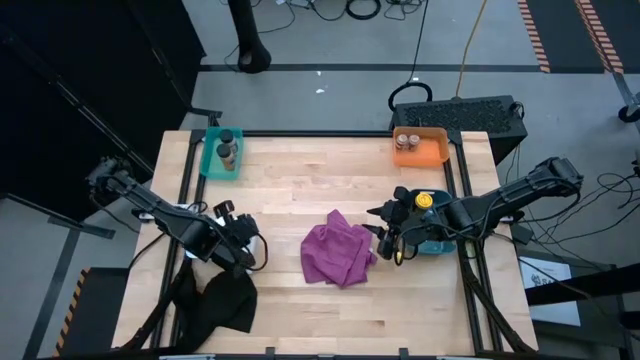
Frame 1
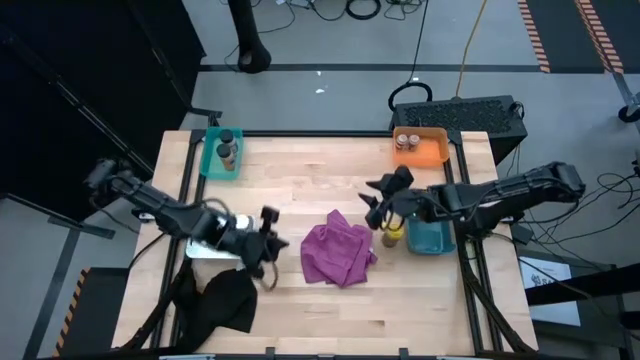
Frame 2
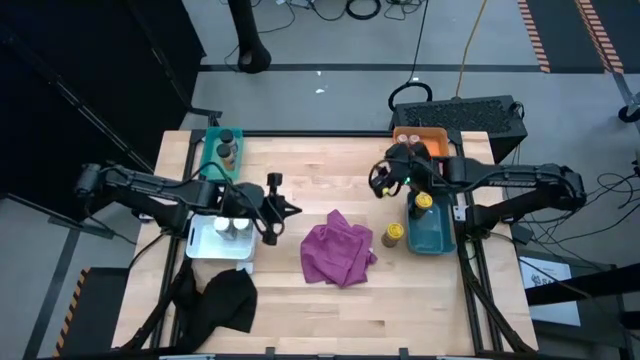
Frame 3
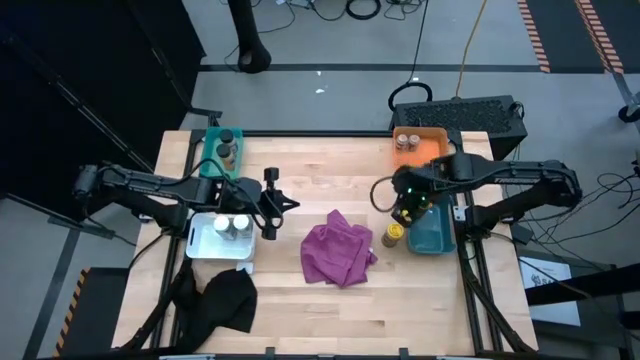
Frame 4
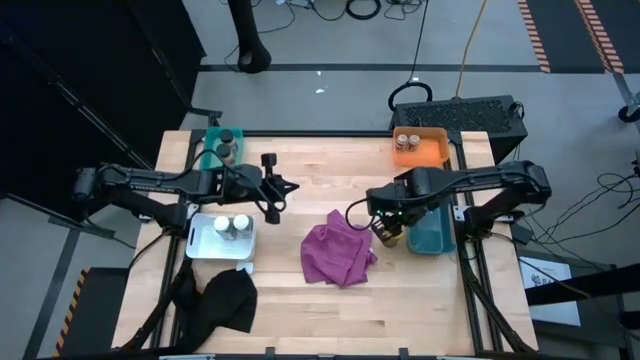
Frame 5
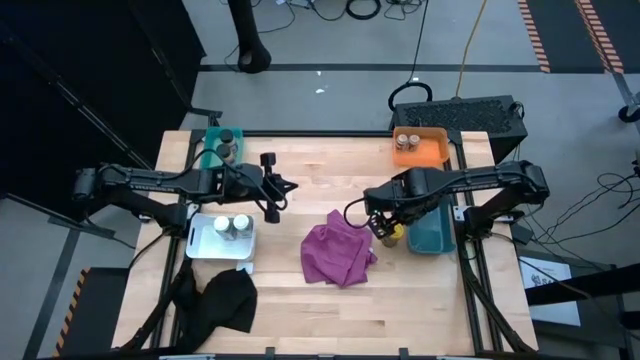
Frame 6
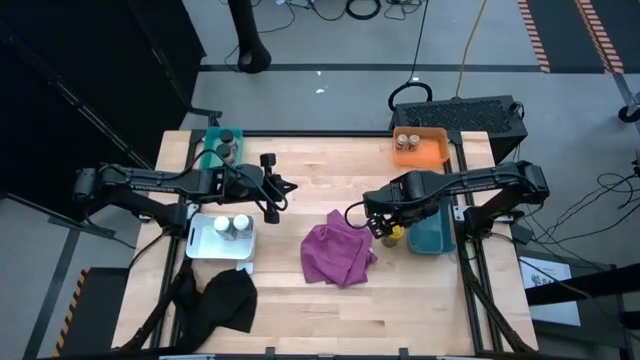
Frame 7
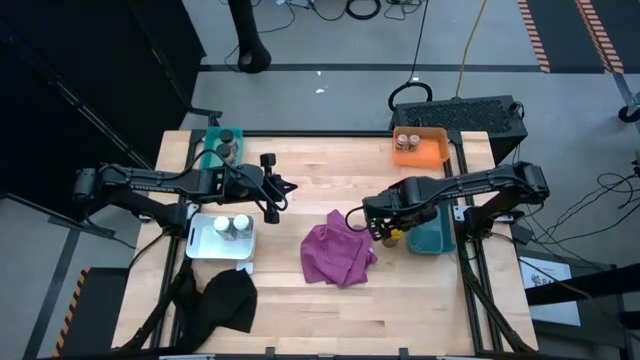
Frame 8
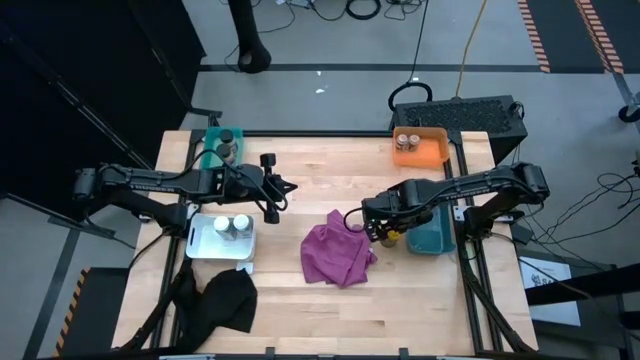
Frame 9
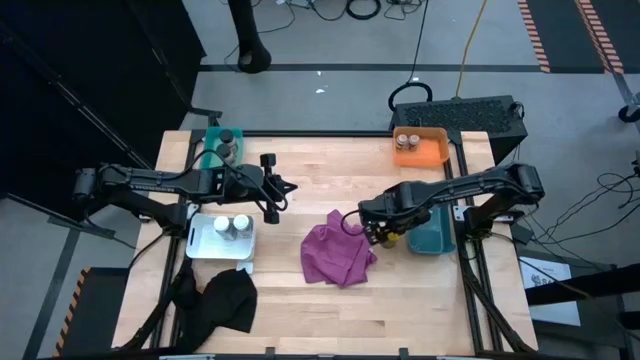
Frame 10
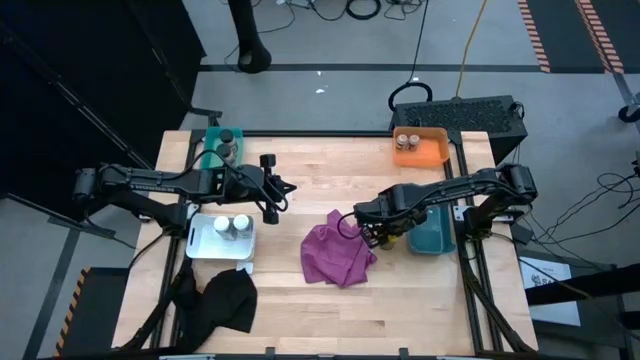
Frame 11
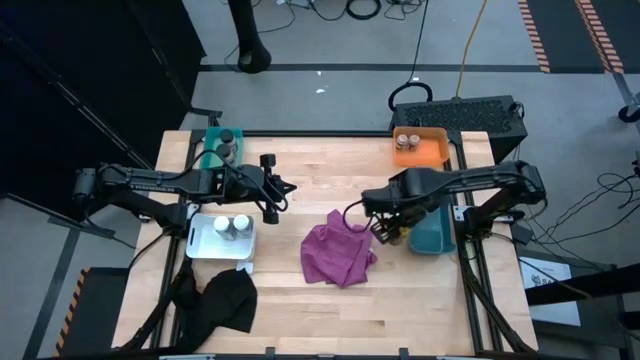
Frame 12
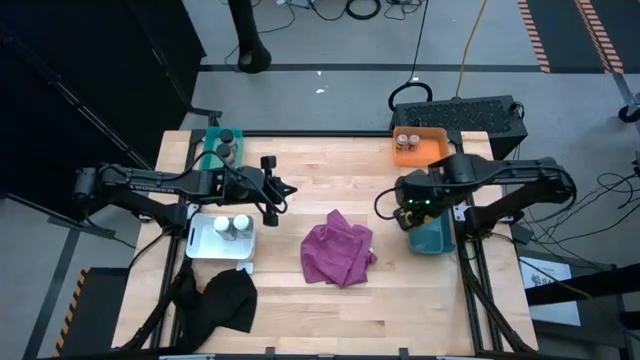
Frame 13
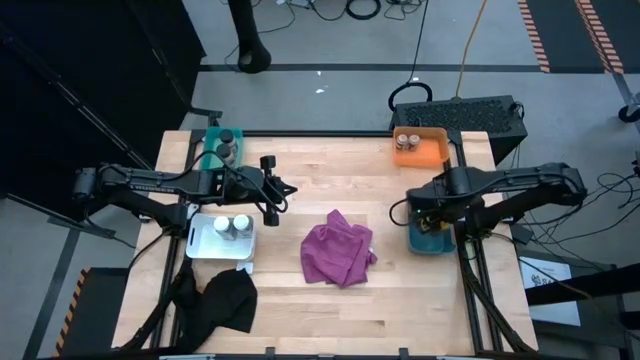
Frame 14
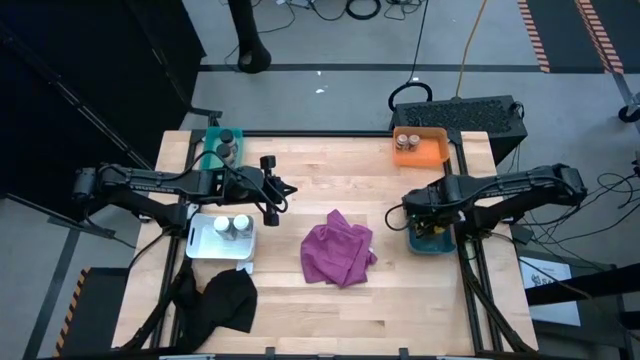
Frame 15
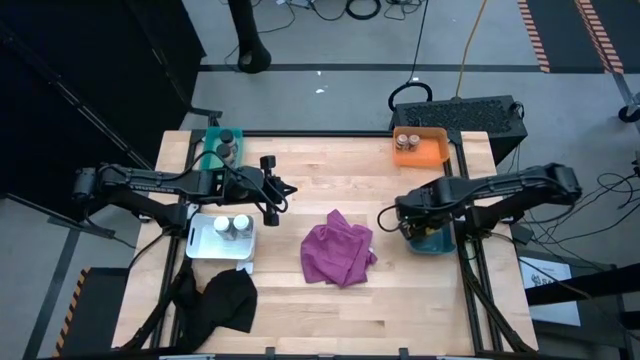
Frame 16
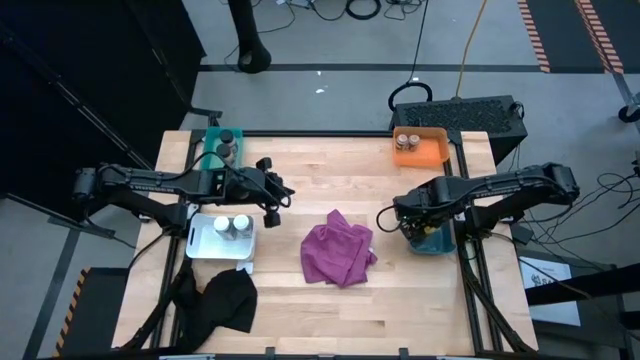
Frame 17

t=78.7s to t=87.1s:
Task: Sort spices by type
Put the yellow seasoning bottle into the blue bin

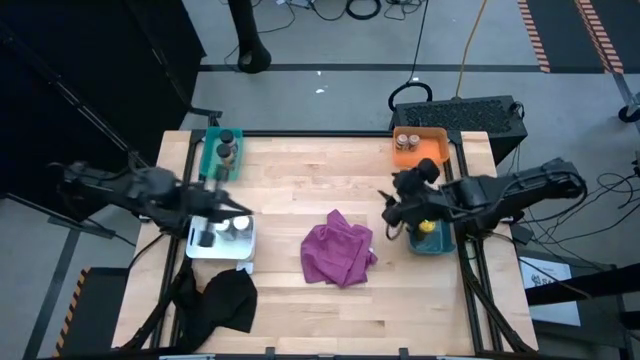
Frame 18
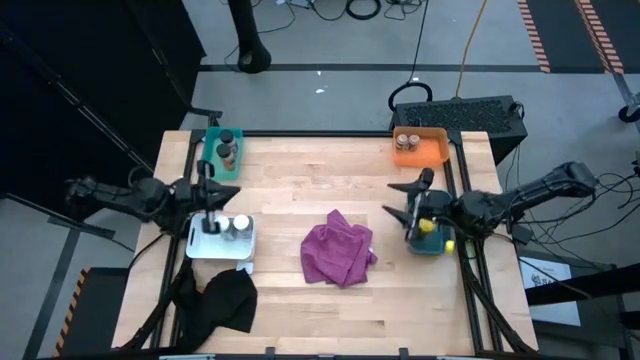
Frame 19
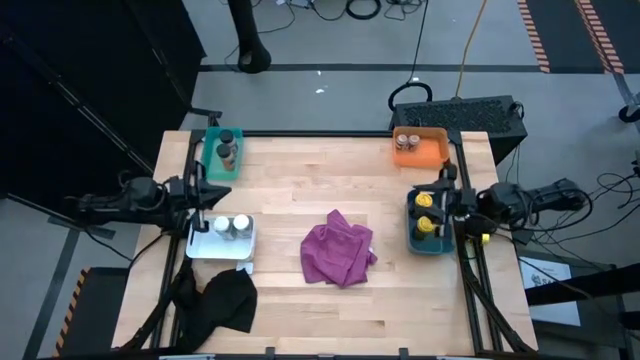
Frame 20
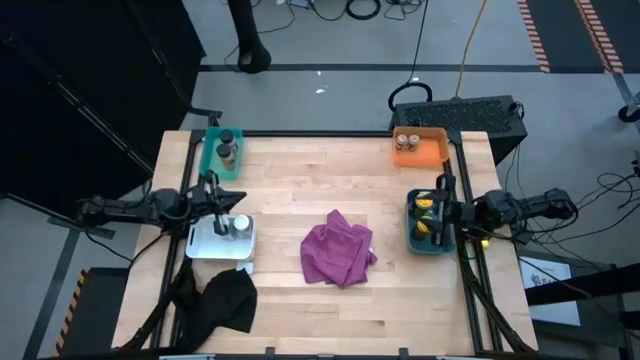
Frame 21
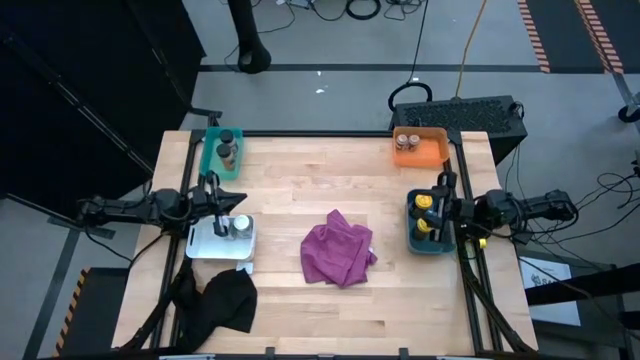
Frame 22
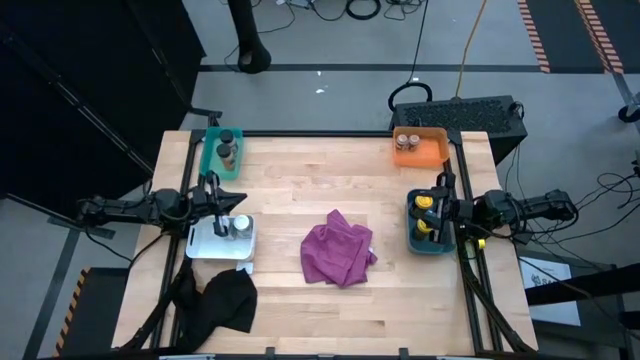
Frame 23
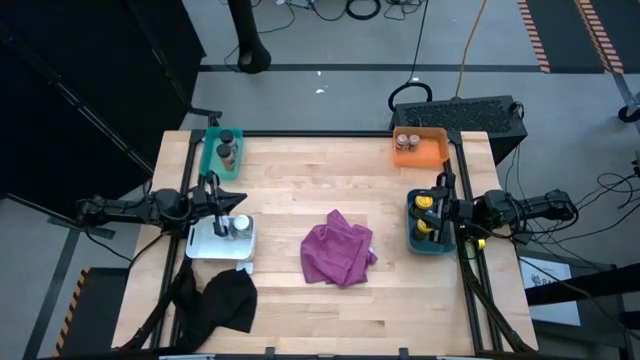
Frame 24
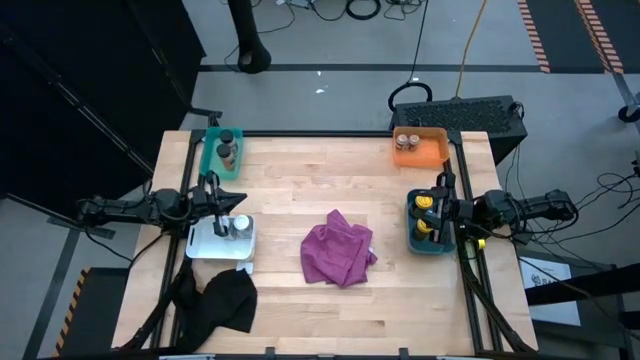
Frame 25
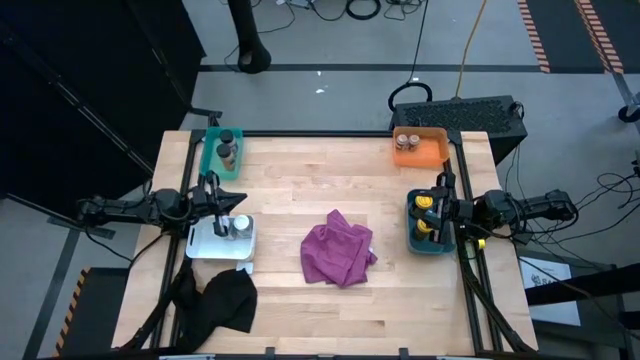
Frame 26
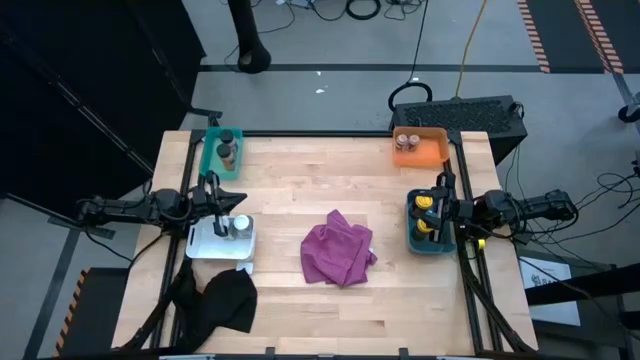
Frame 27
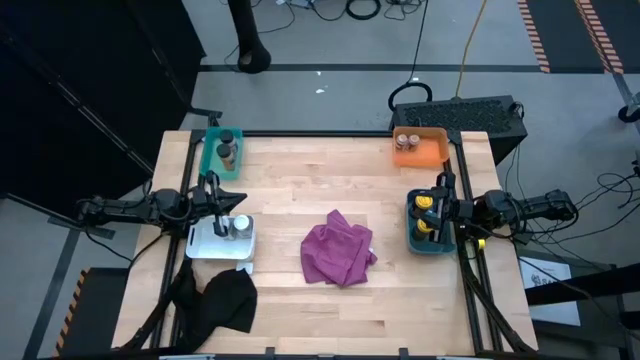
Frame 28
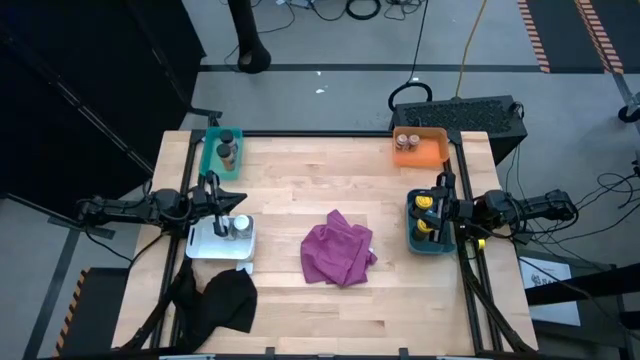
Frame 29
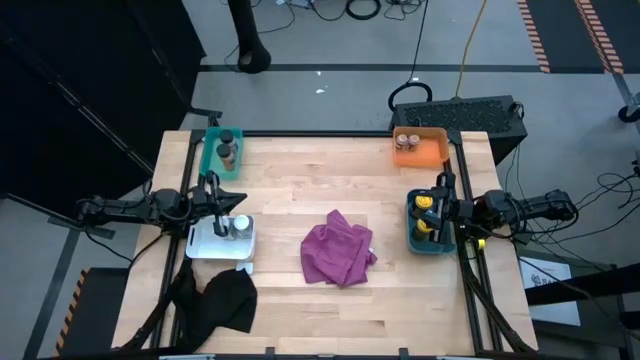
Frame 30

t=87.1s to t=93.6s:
Return to Home Position

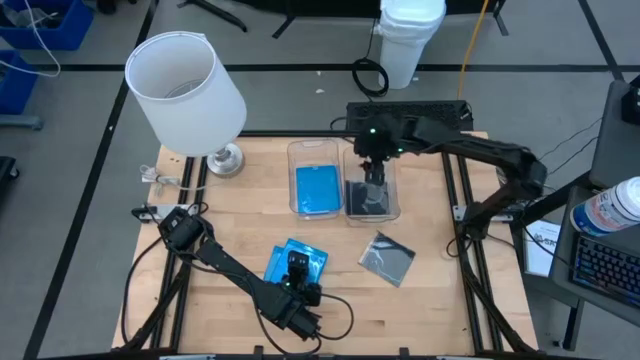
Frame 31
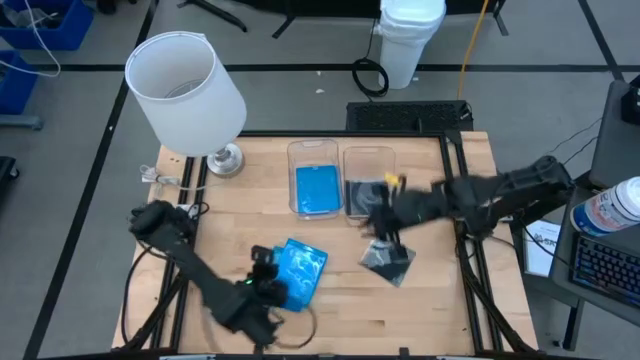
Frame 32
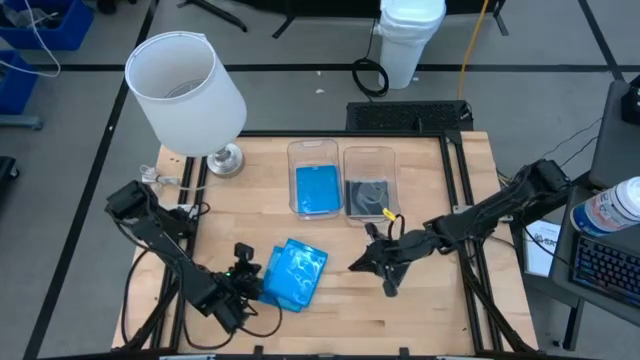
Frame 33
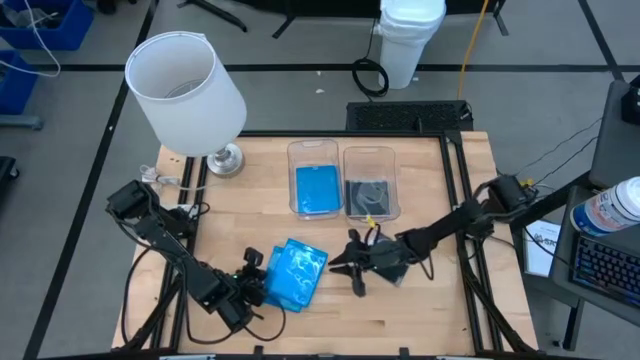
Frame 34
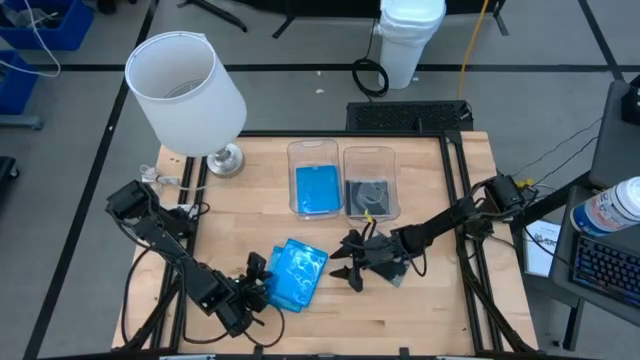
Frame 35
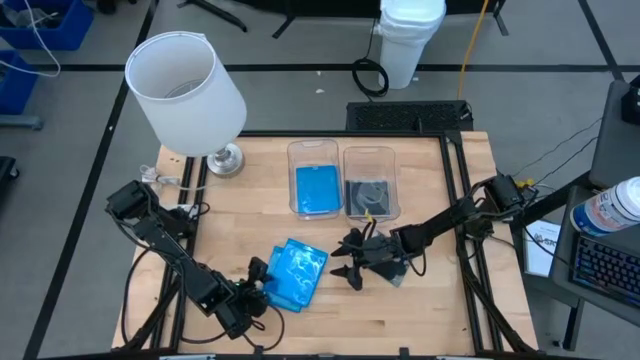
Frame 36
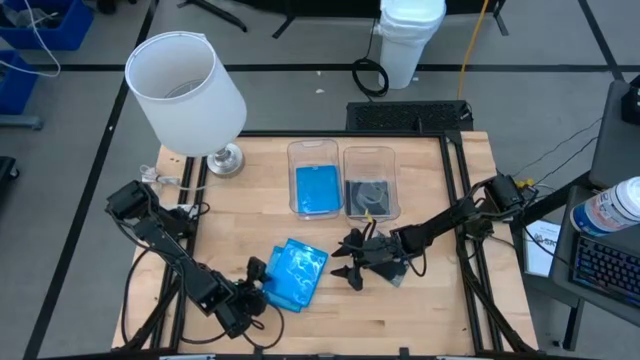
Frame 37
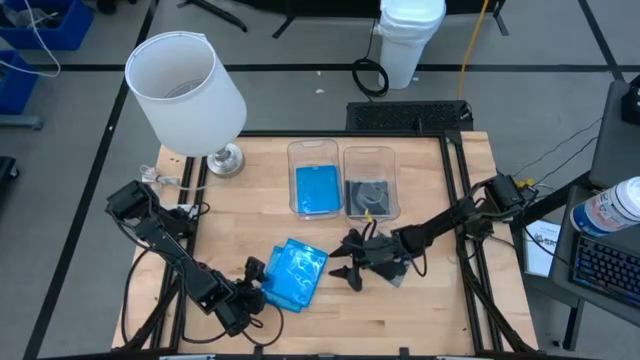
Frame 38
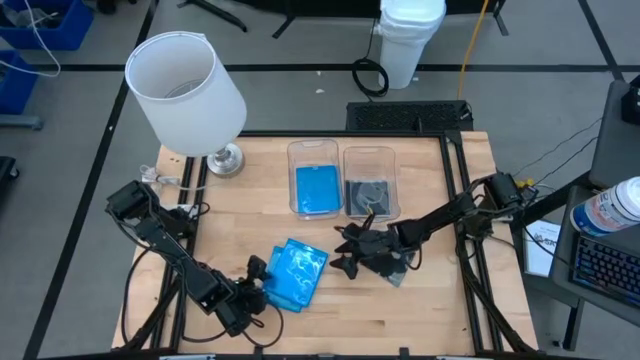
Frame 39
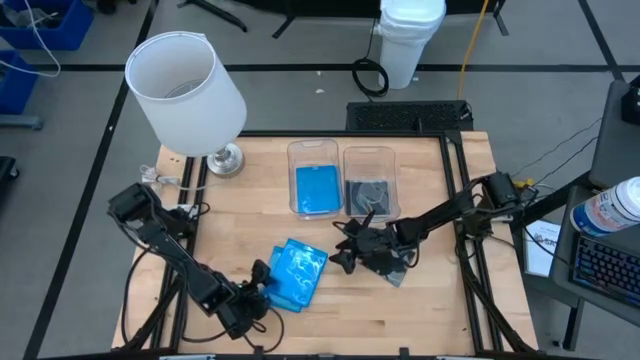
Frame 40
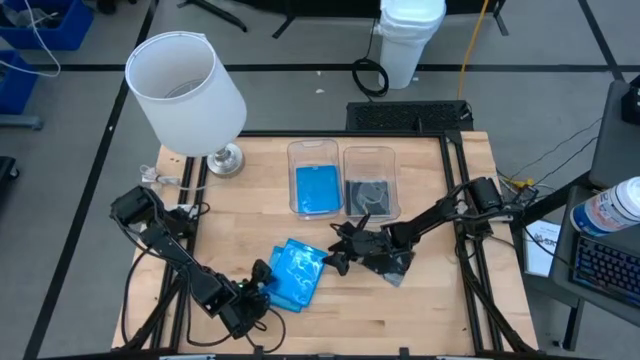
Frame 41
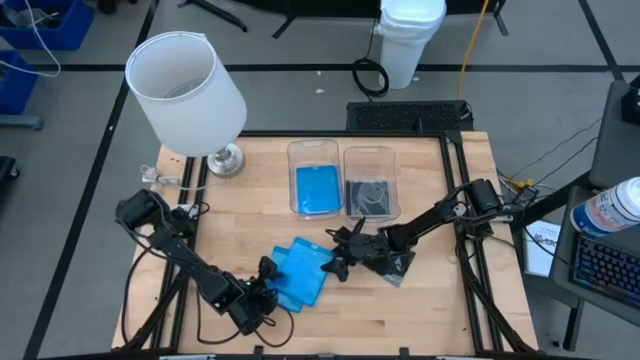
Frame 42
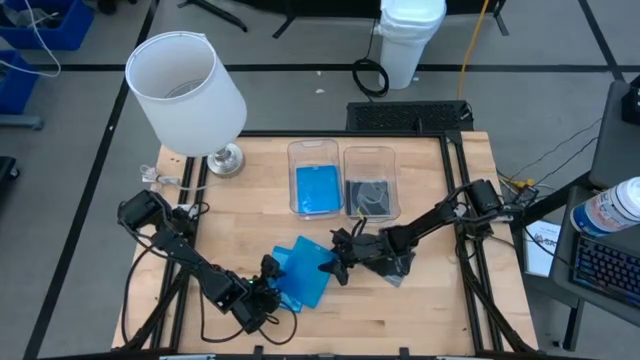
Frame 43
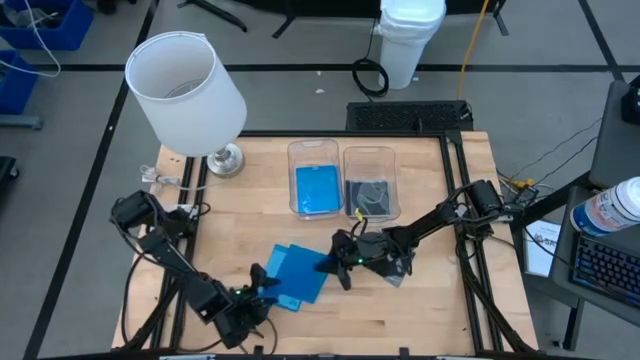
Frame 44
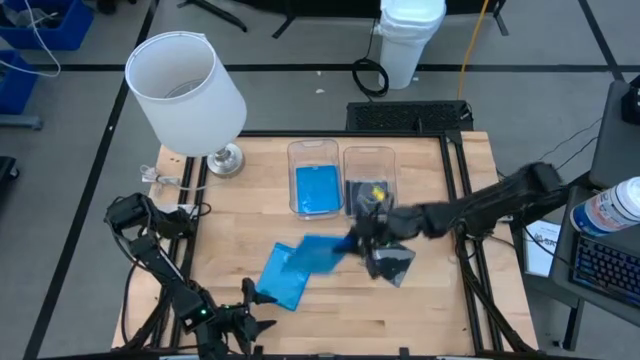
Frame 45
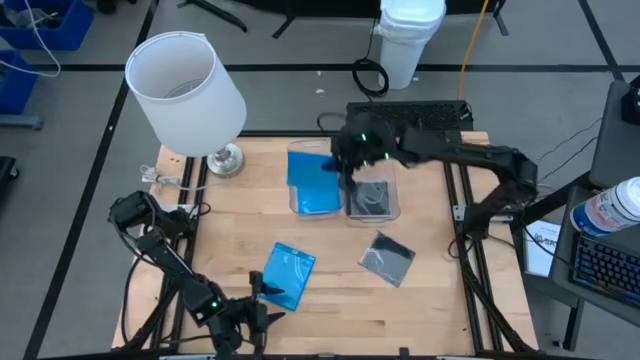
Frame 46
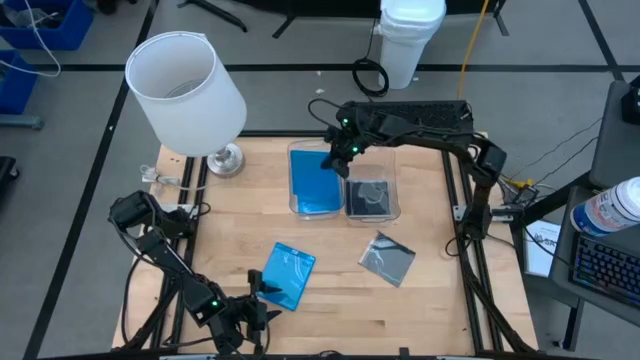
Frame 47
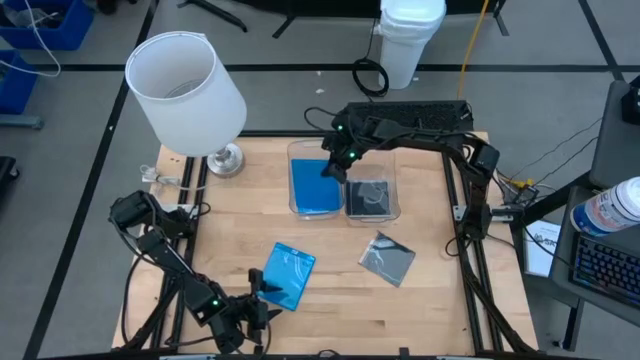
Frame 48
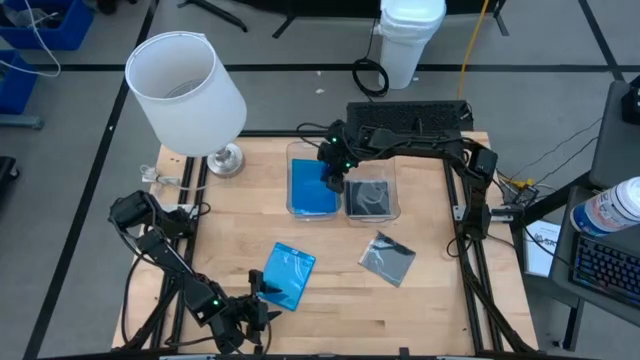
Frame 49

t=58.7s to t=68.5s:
Task: Pick & place jewel cases by type
Stack the top blue CD case on top of the blue CD case in the left transparent bin
